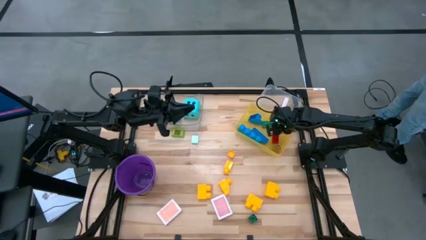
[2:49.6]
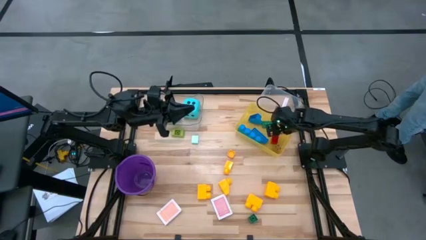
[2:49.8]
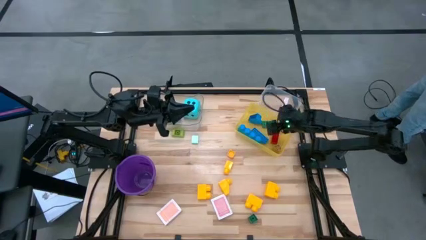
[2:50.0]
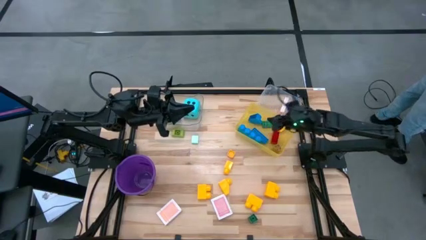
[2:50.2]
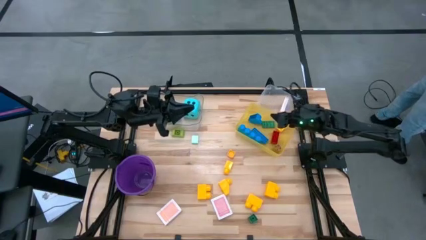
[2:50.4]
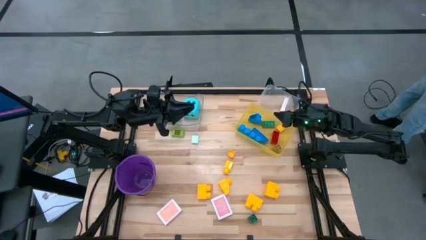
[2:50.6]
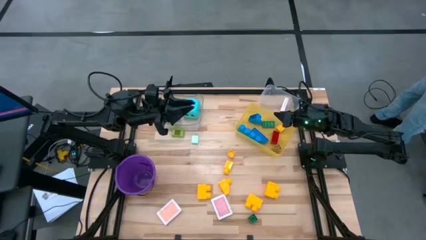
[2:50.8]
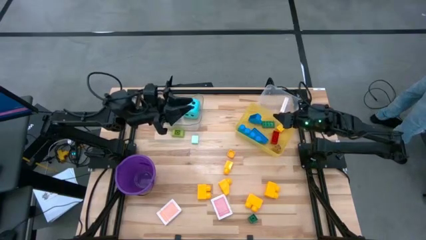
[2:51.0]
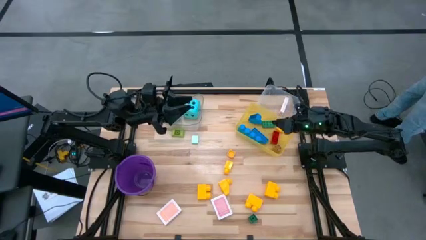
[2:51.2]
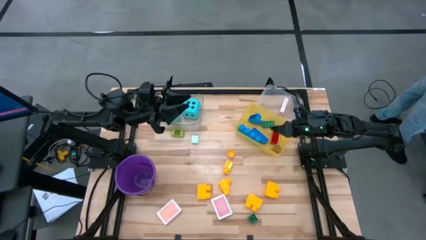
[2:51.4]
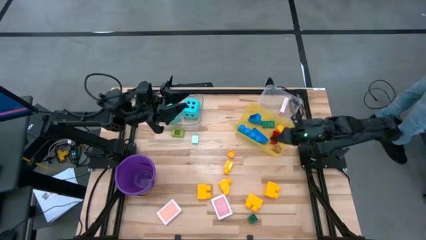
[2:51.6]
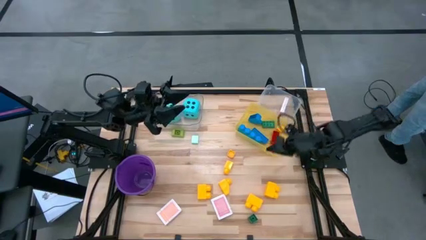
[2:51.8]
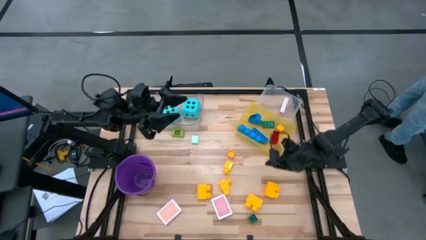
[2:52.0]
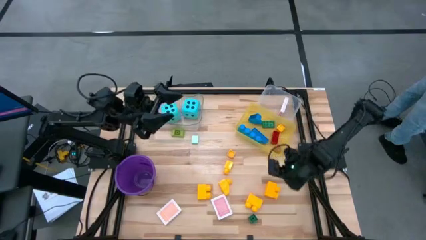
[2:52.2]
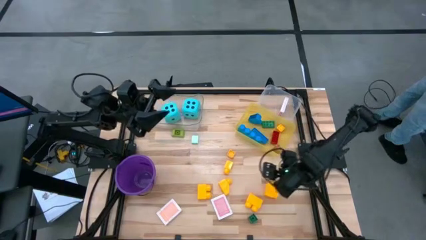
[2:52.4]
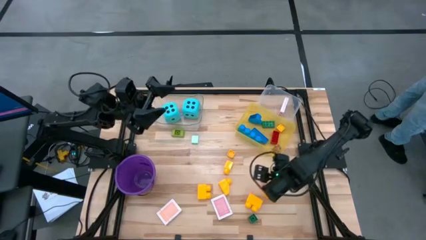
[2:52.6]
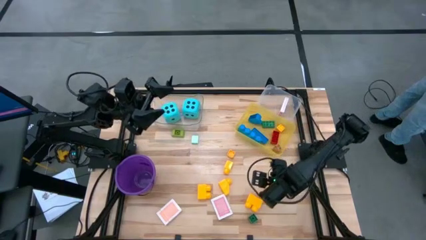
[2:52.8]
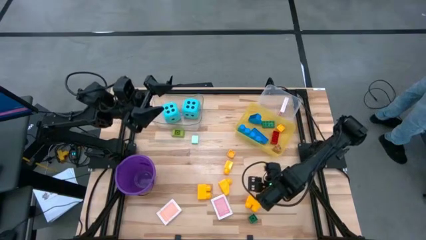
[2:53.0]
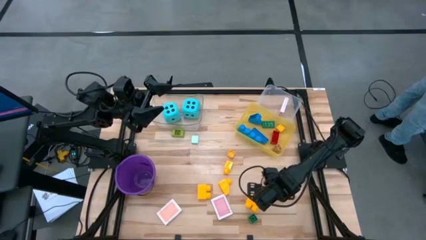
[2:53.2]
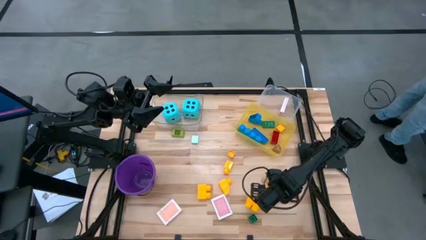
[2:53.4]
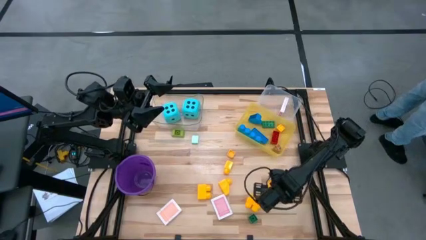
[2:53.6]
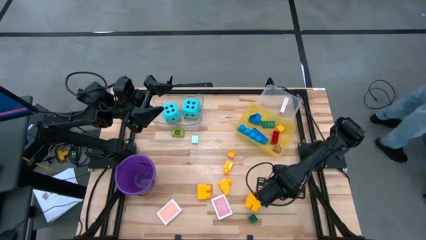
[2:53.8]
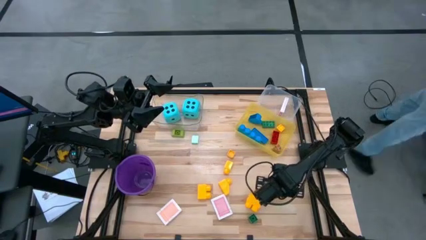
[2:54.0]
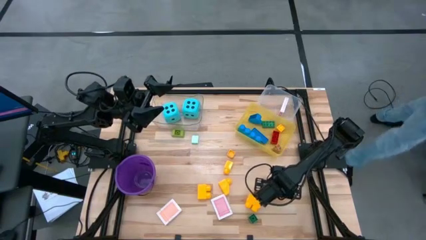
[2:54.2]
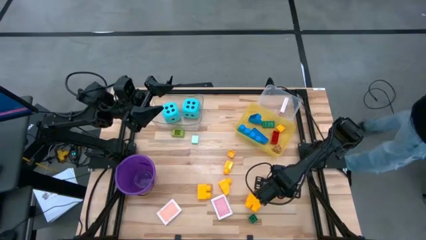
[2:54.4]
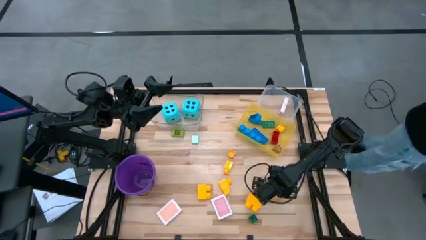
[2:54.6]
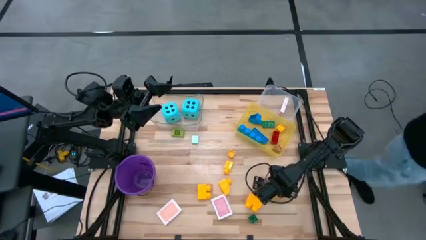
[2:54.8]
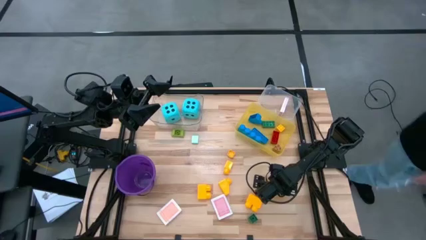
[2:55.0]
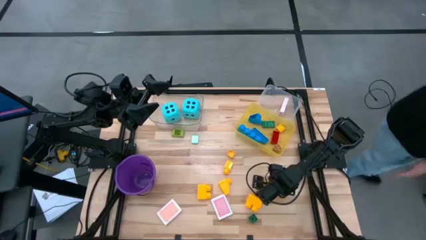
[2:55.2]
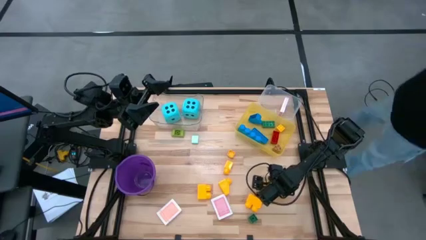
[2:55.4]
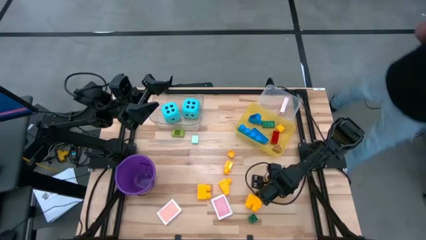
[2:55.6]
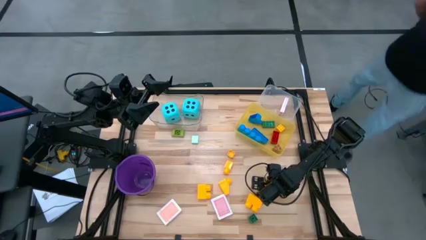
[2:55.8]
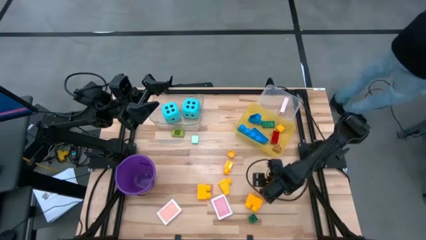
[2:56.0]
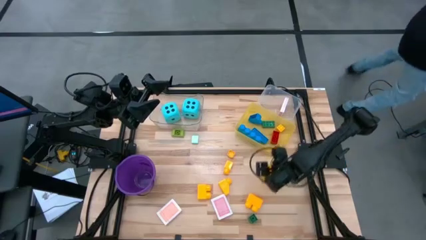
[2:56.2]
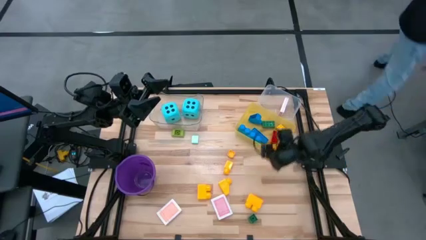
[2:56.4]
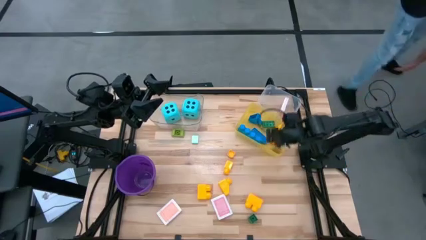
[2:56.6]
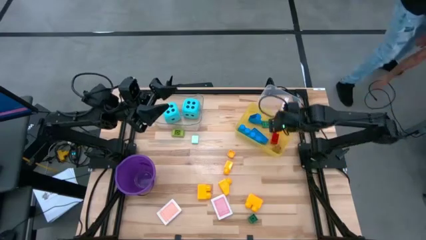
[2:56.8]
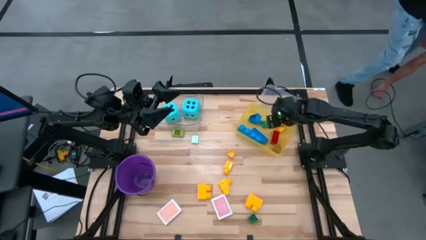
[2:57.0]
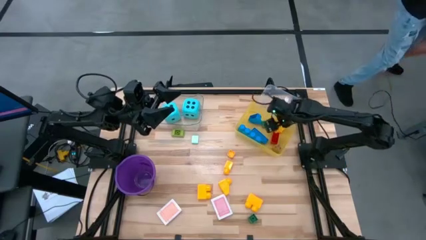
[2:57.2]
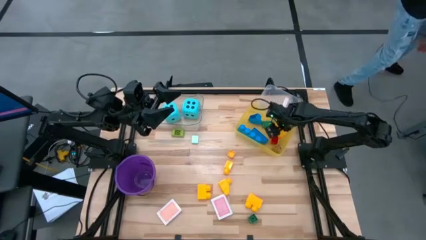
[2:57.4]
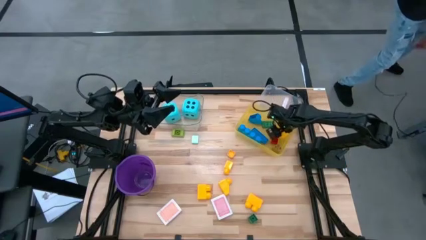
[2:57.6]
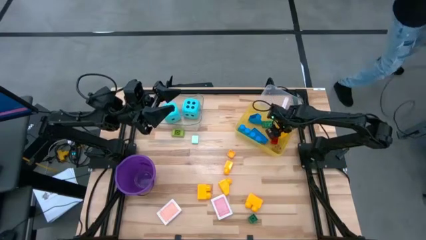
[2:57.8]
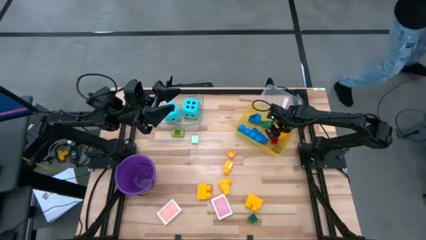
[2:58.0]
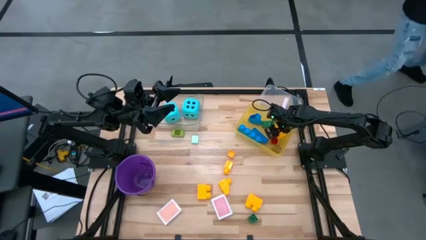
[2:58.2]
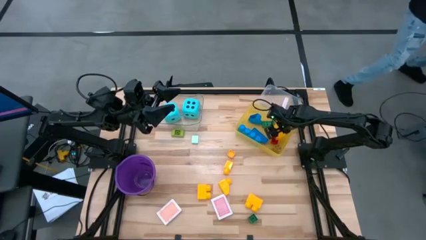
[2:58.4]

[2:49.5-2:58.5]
Task: Pick & Place Toys
Put the yellow game piece into the yellow bin
